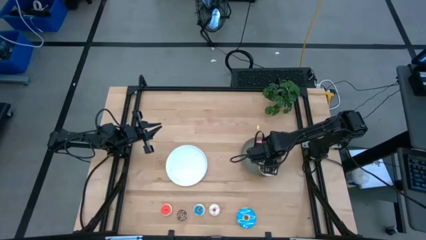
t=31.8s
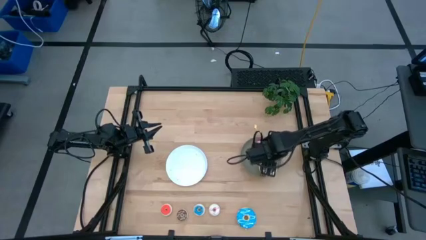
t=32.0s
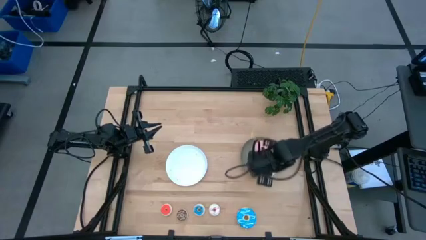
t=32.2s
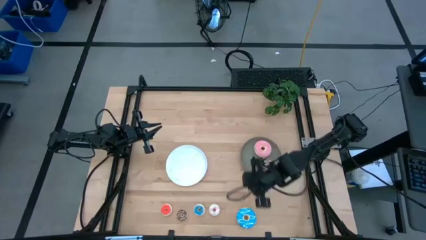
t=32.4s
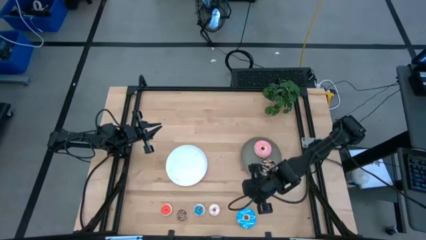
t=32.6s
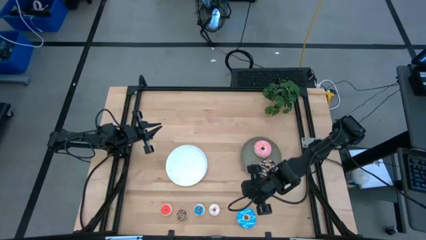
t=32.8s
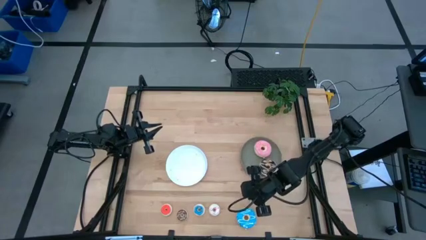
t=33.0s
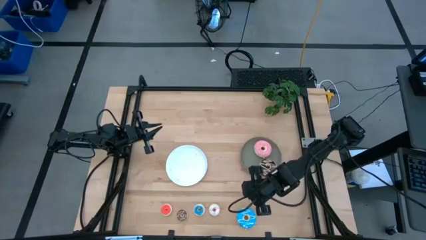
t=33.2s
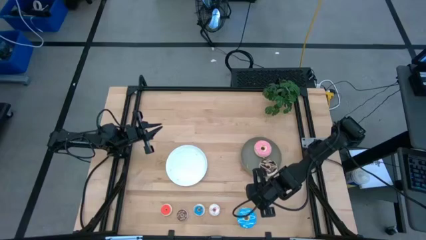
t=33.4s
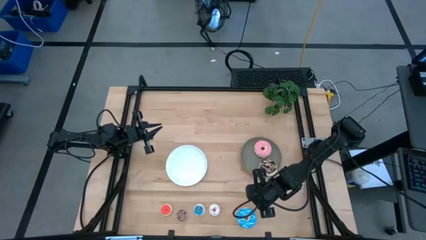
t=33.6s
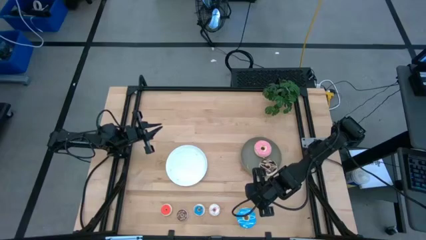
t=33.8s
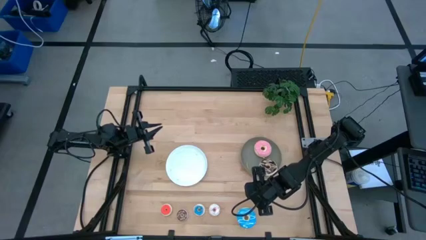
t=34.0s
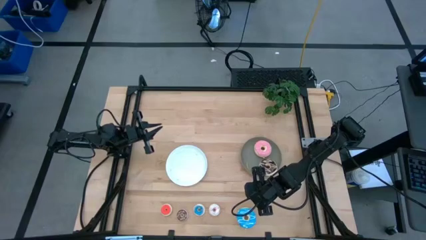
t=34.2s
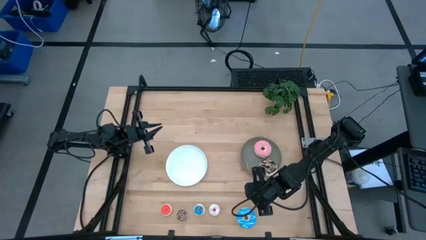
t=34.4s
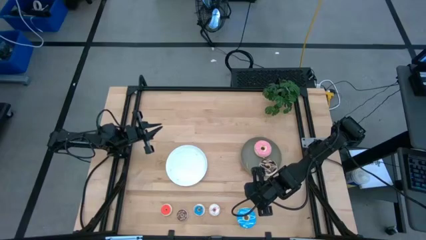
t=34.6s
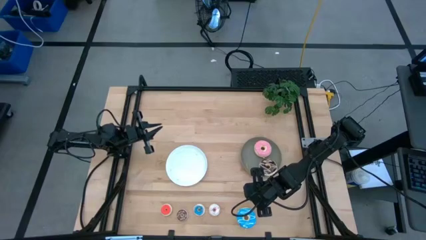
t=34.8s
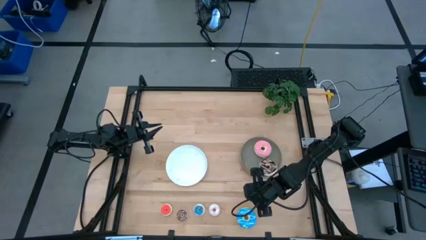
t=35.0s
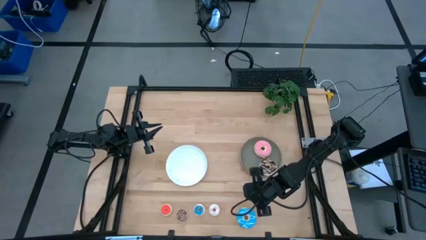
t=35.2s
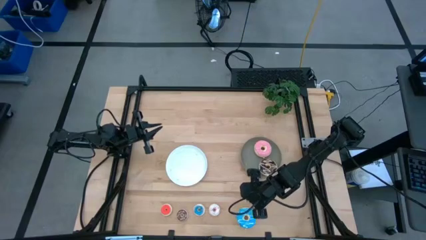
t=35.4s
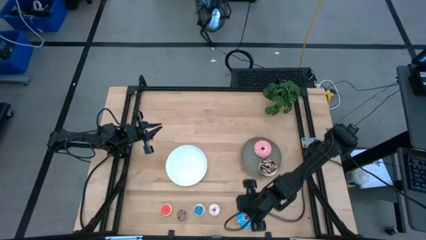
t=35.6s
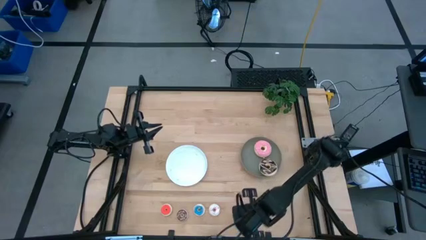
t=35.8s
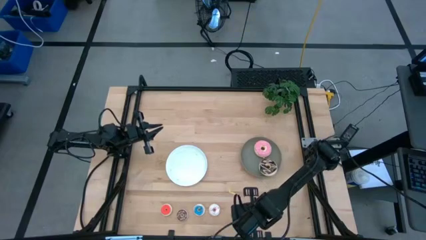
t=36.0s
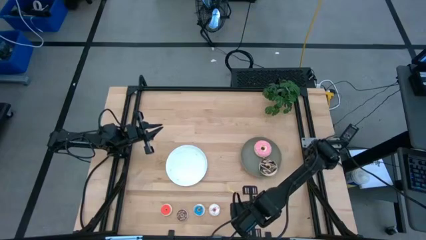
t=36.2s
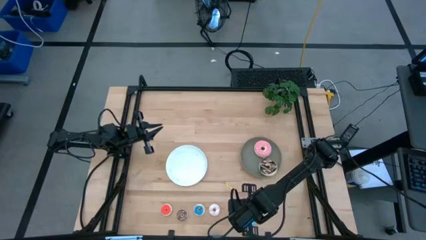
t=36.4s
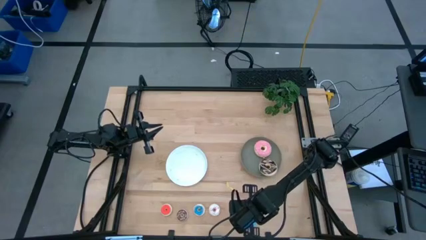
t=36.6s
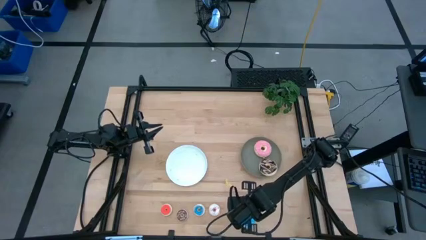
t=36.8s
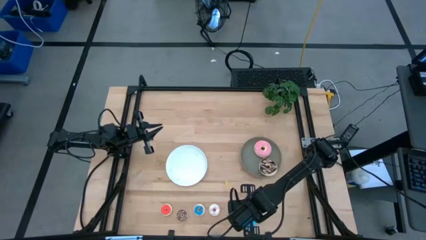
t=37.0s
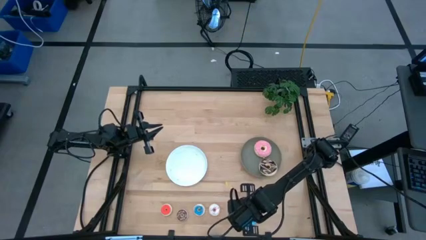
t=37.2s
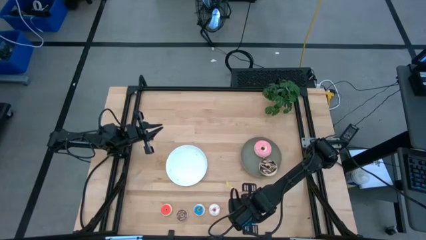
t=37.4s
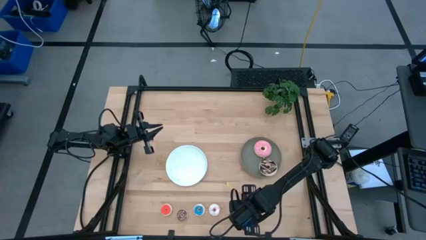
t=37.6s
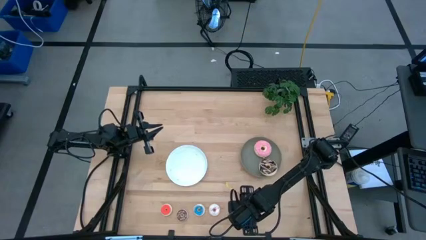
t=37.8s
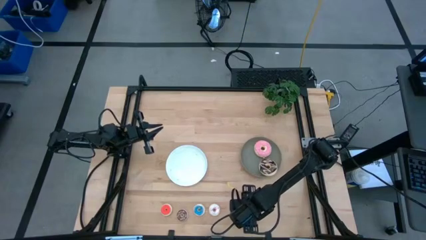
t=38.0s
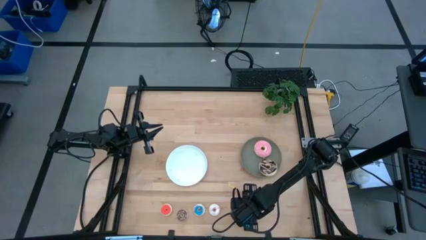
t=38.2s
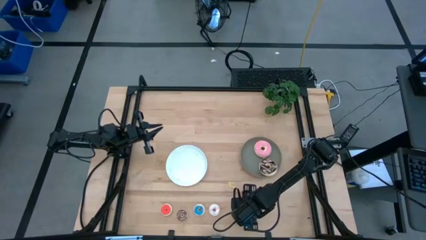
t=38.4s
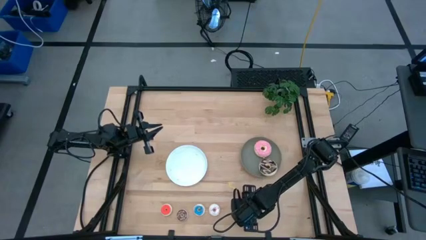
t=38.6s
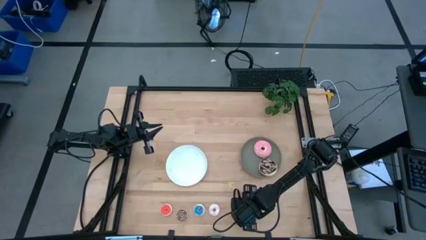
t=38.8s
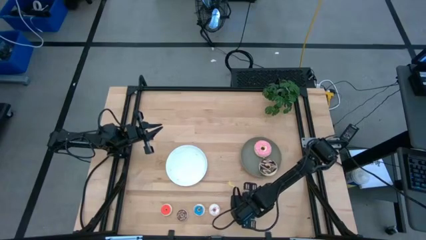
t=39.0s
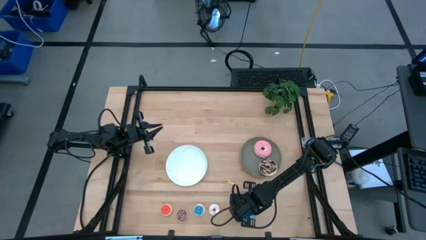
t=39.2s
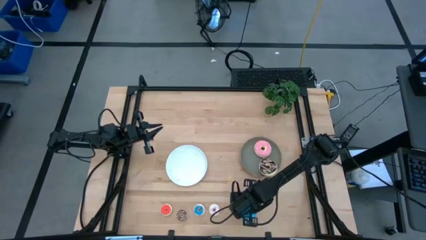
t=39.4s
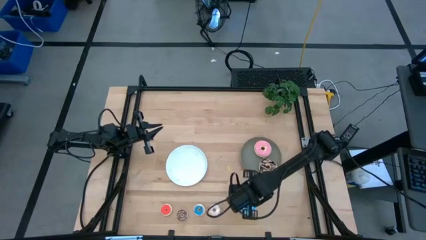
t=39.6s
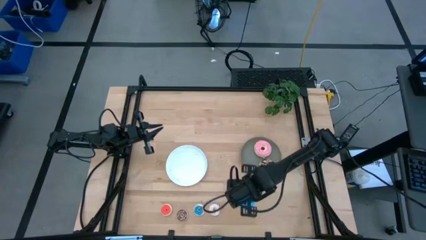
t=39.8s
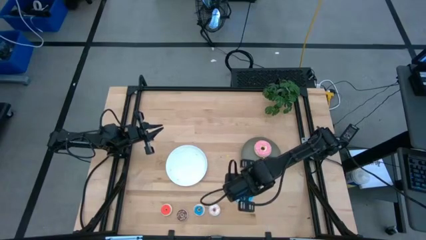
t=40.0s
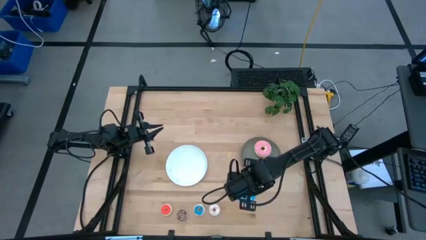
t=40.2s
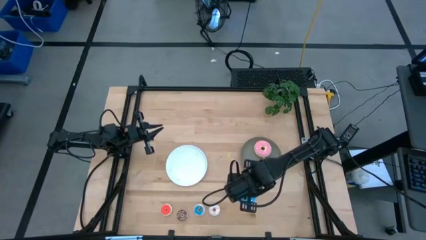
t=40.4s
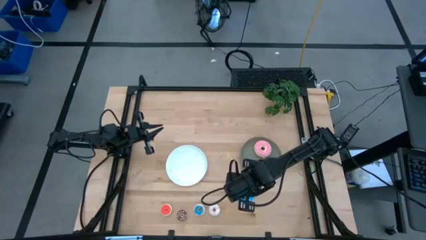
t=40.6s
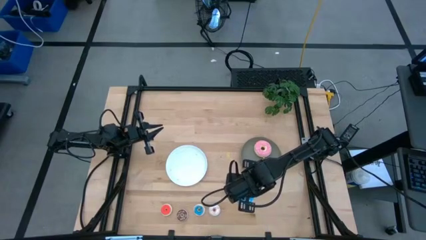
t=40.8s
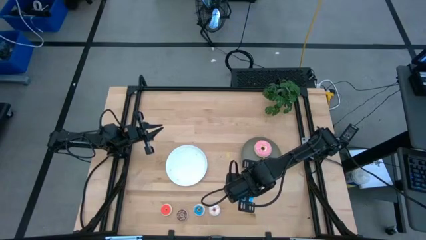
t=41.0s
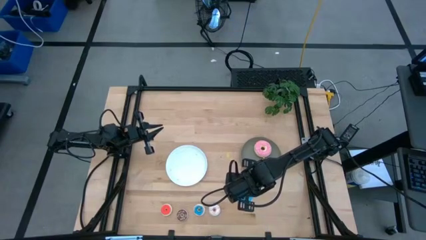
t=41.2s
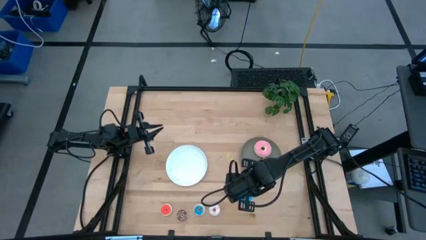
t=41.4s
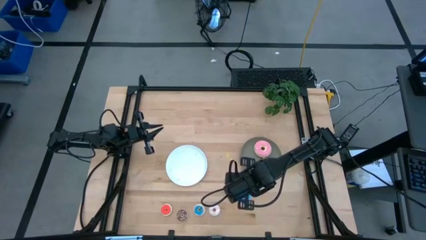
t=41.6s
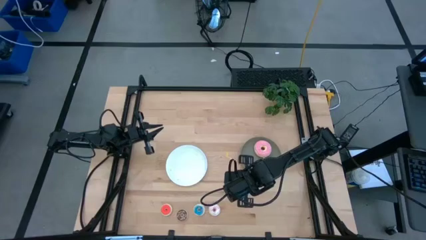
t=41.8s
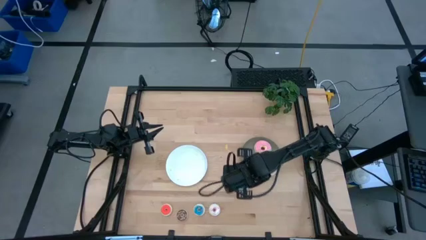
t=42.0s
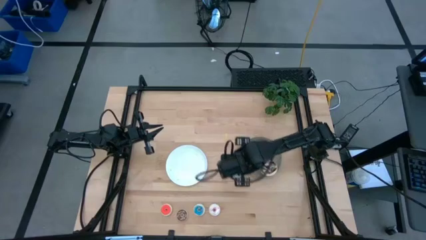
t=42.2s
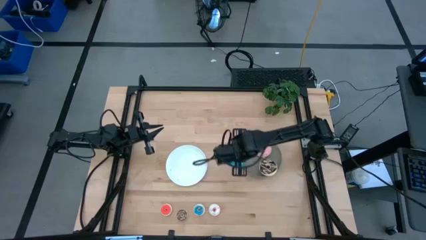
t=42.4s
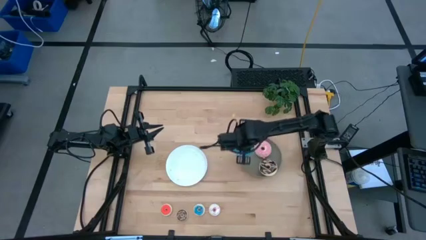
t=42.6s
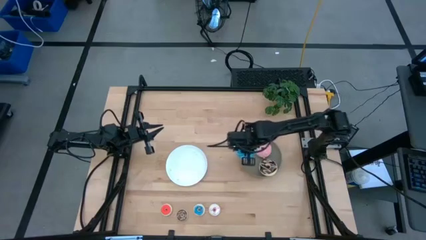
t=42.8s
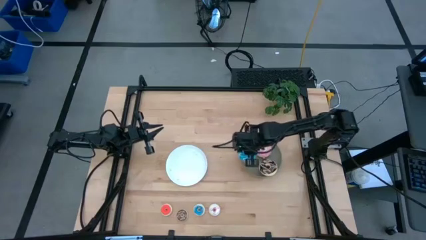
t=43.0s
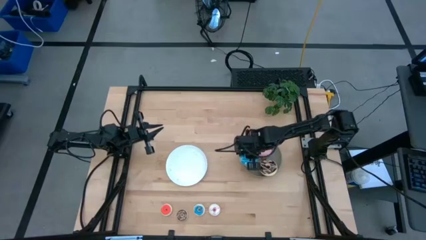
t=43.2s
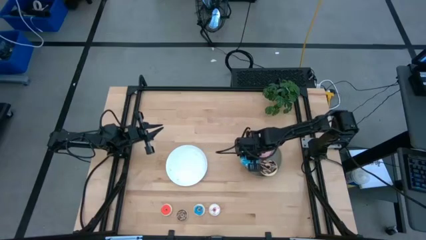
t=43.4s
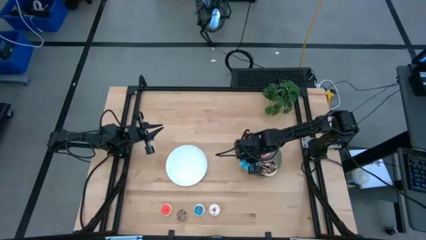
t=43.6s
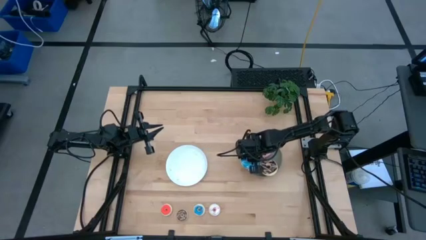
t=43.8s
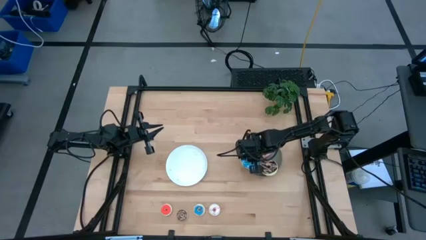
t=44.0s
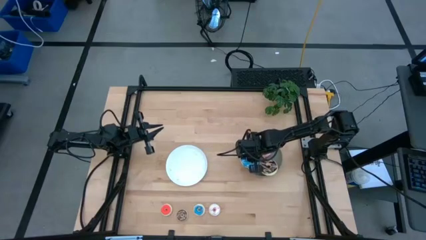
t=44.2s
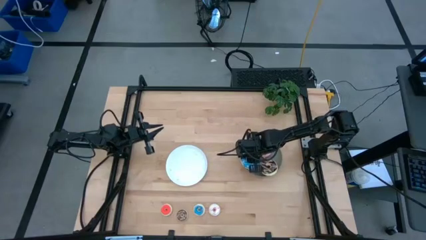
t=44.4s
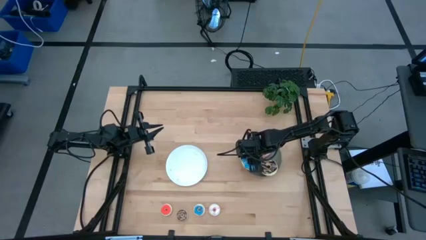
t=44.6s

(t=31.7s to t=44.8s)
Task: Pick & Place donuts
Put the big blue donut on the gray plate
